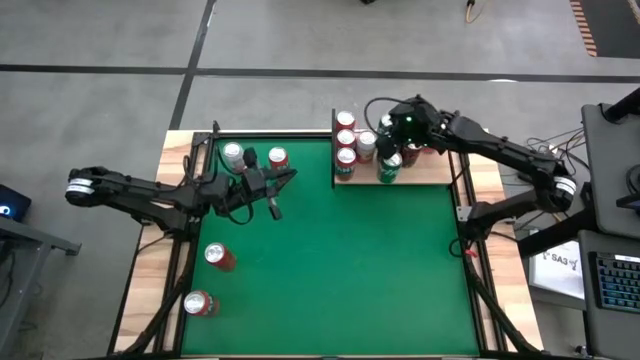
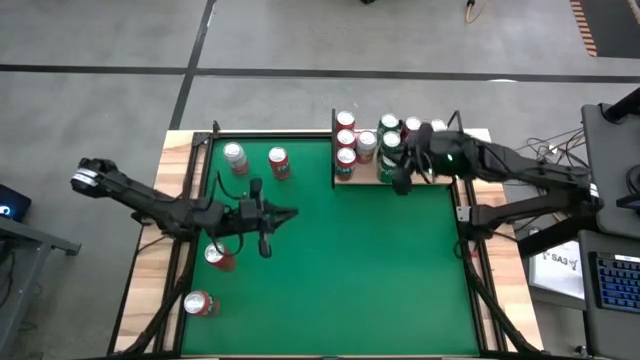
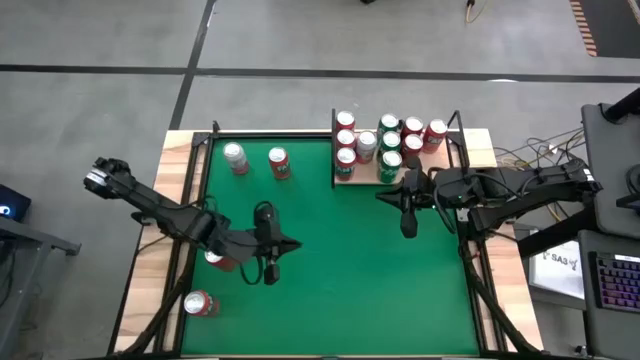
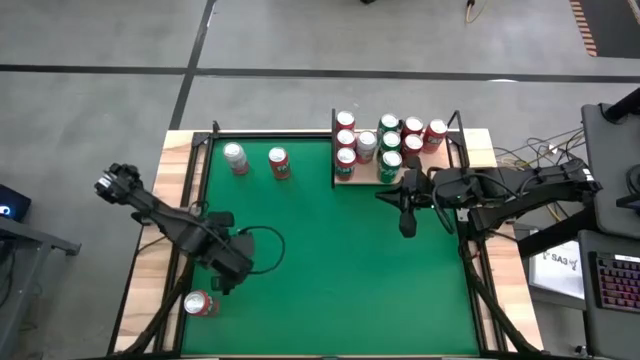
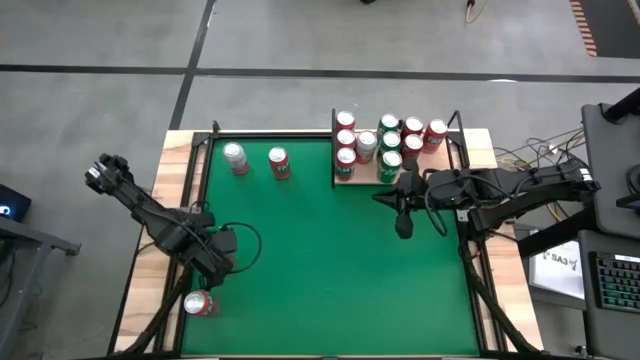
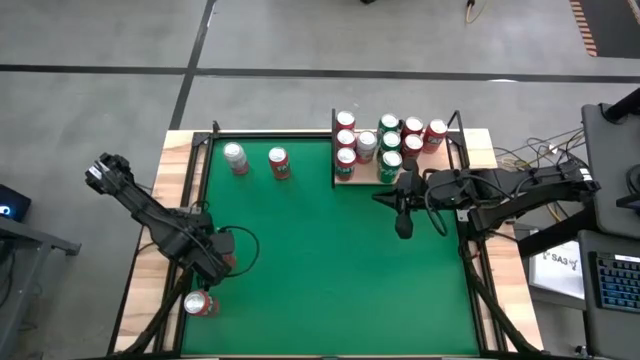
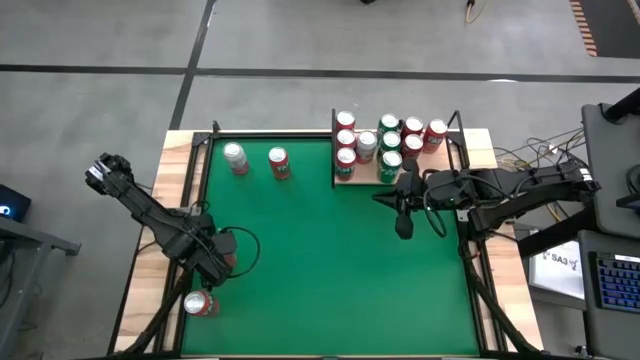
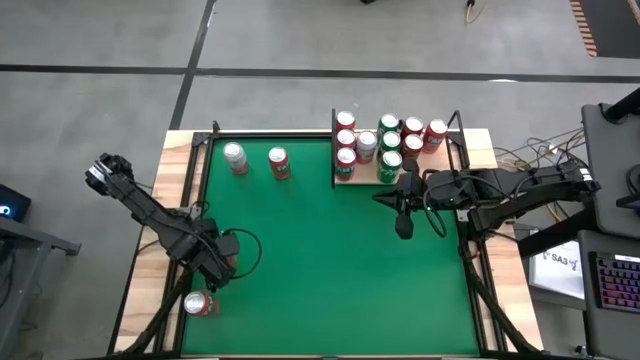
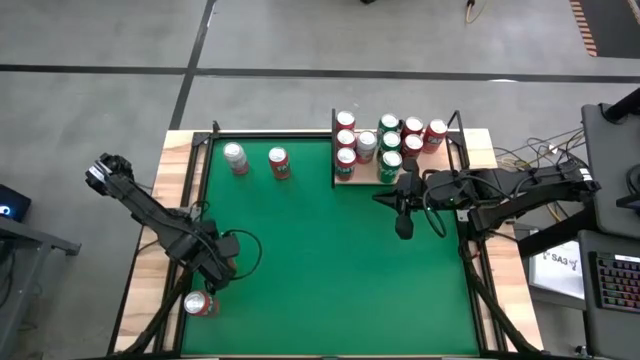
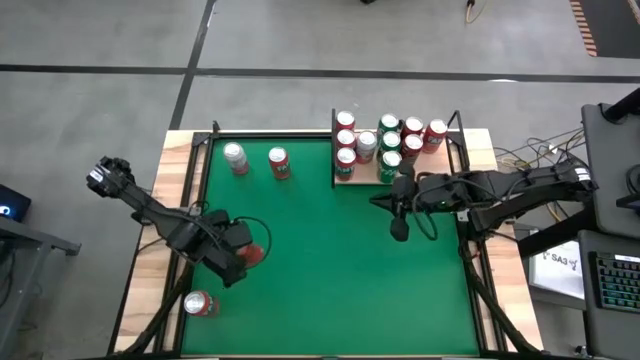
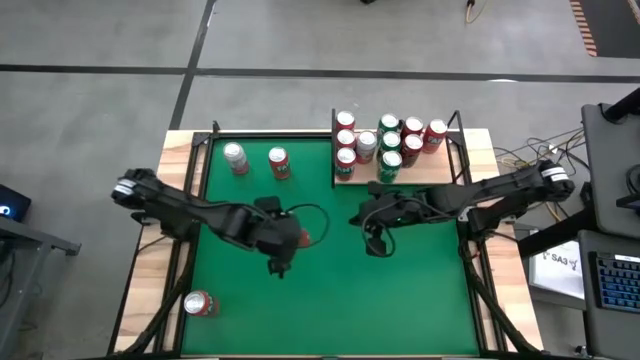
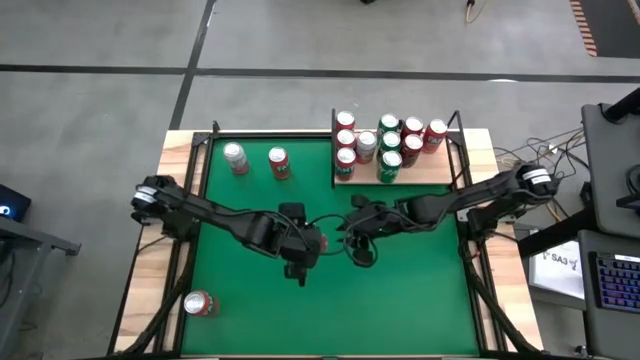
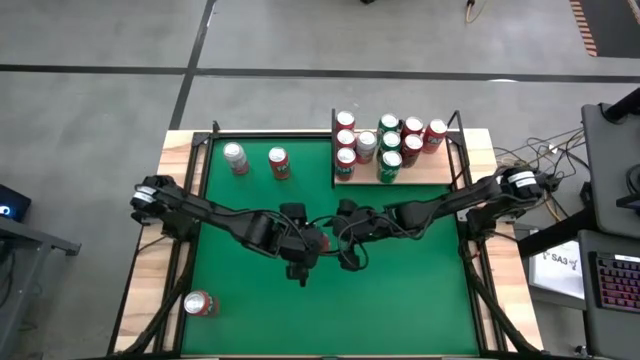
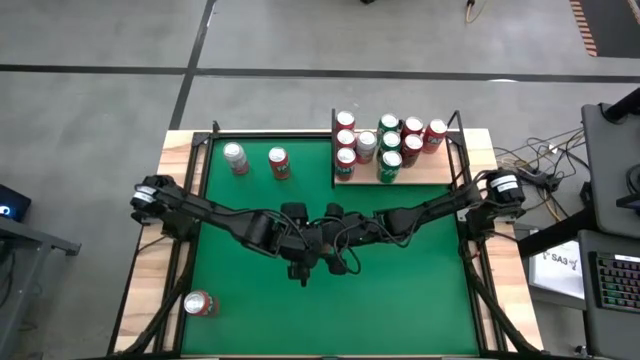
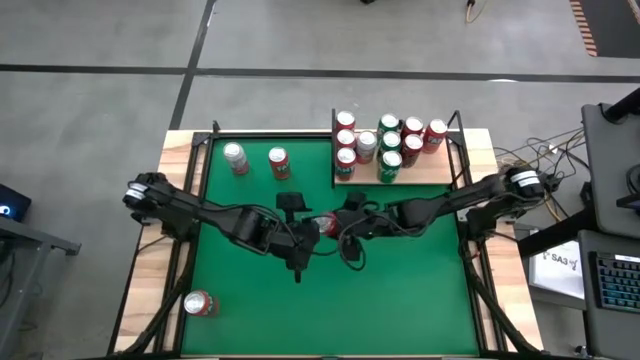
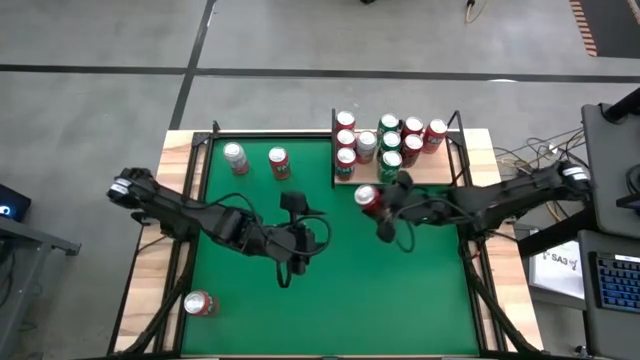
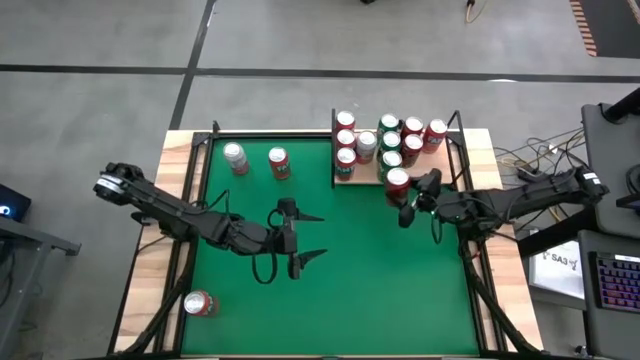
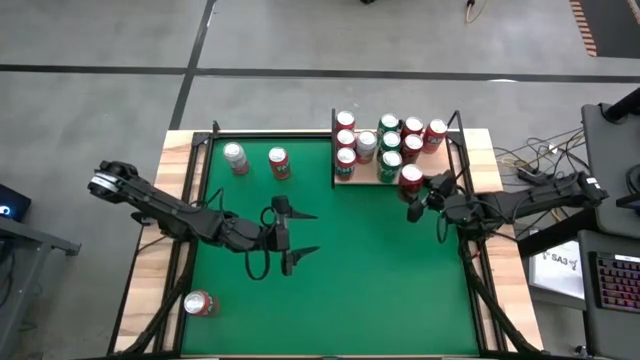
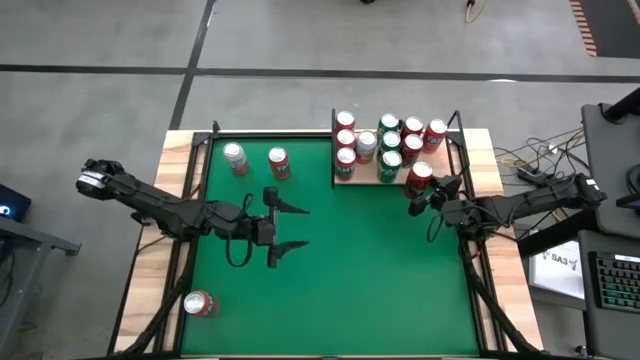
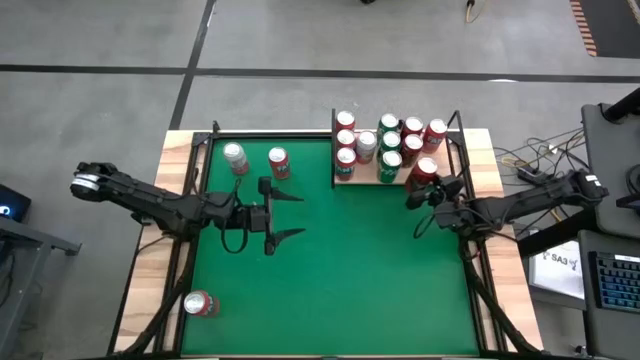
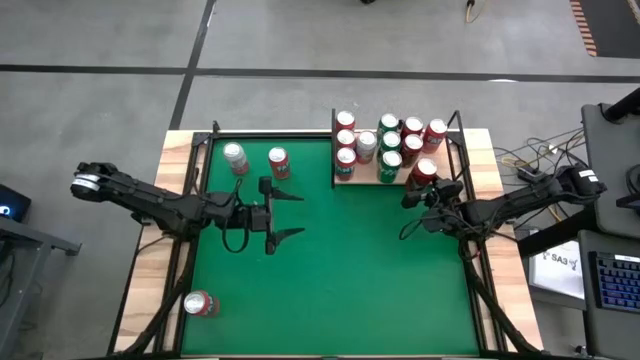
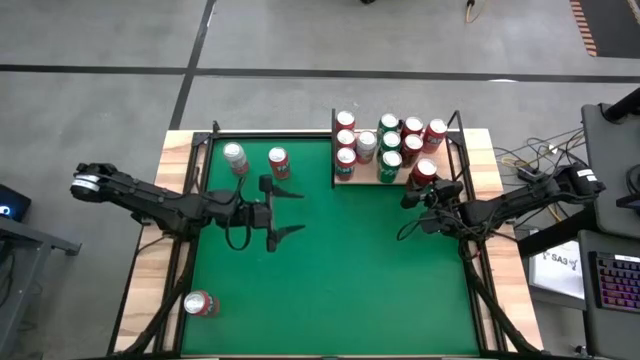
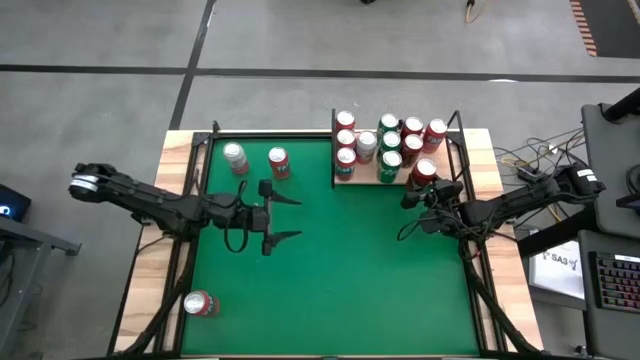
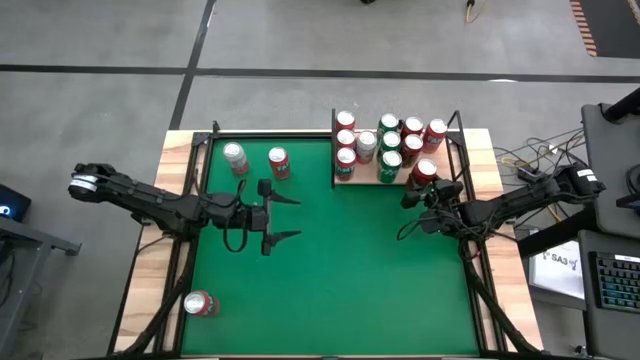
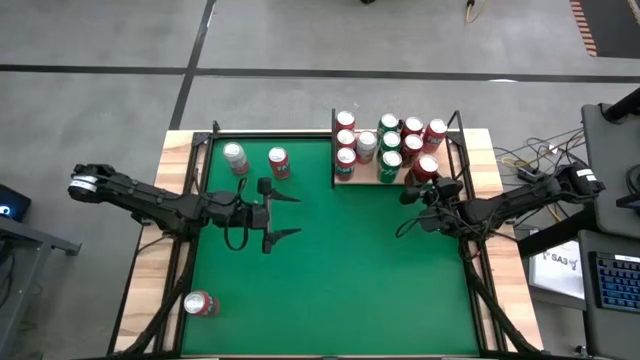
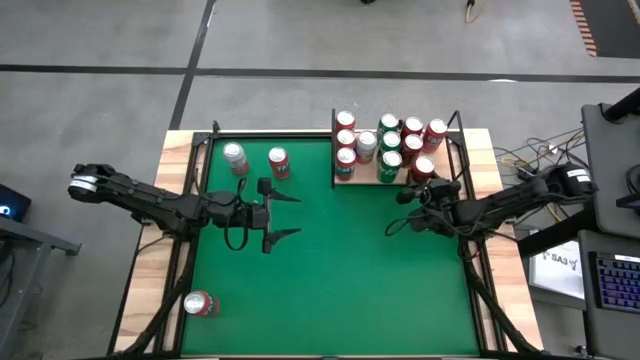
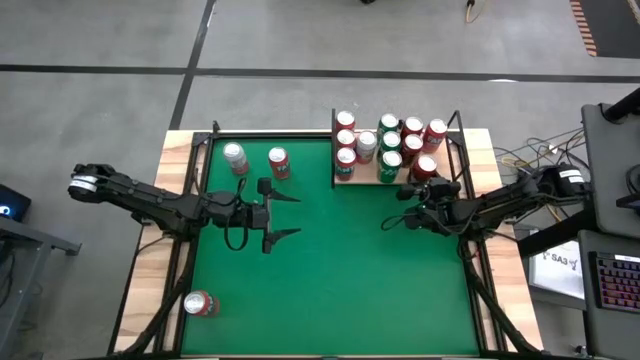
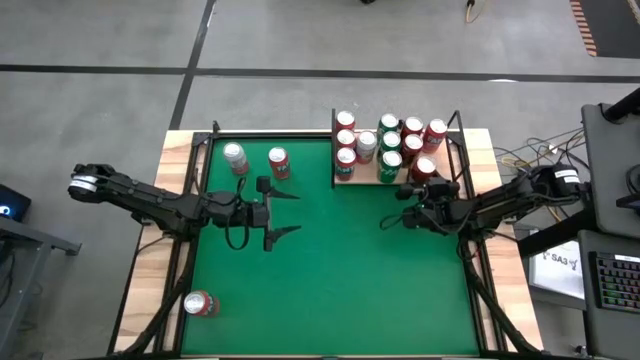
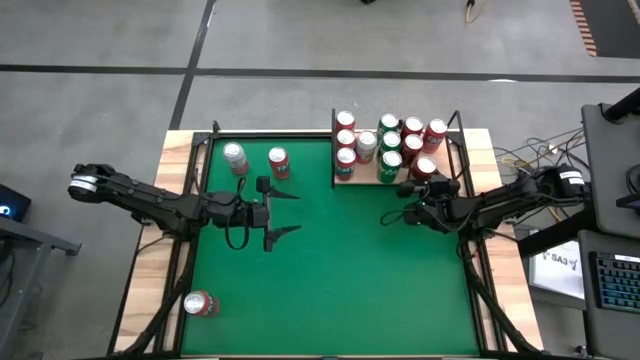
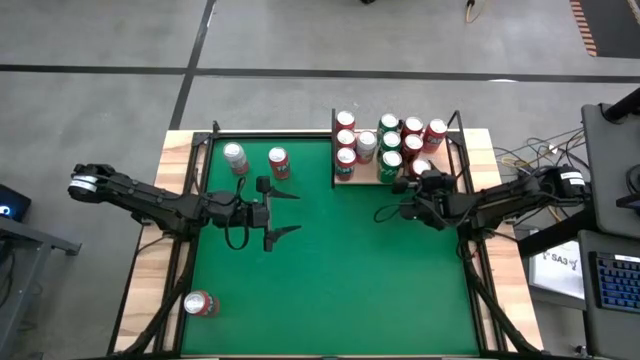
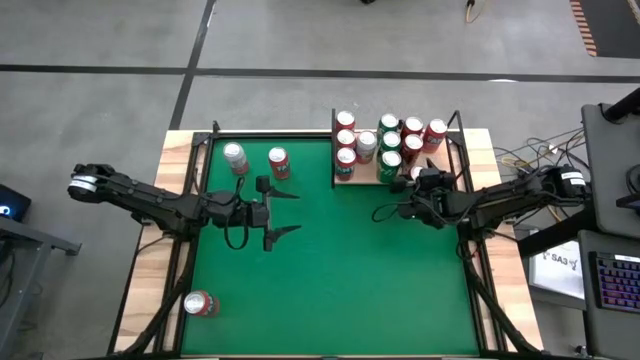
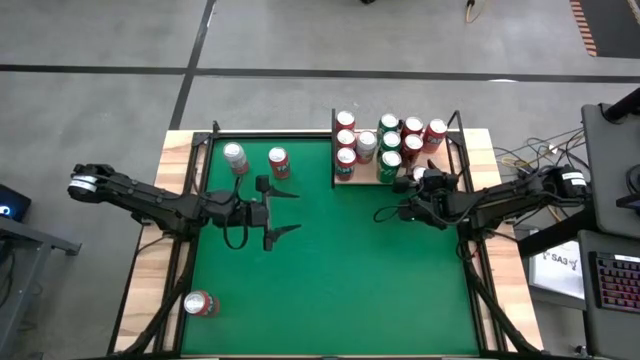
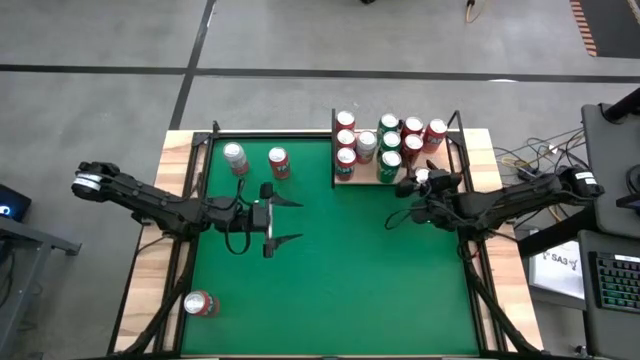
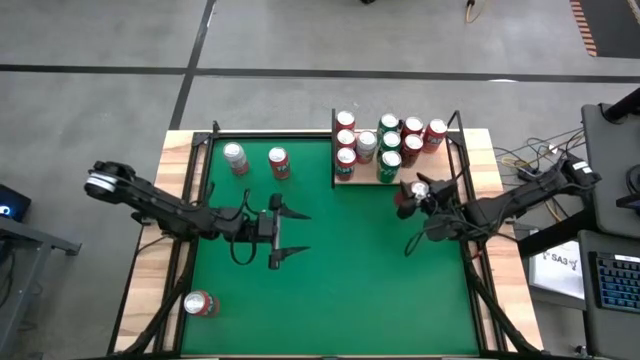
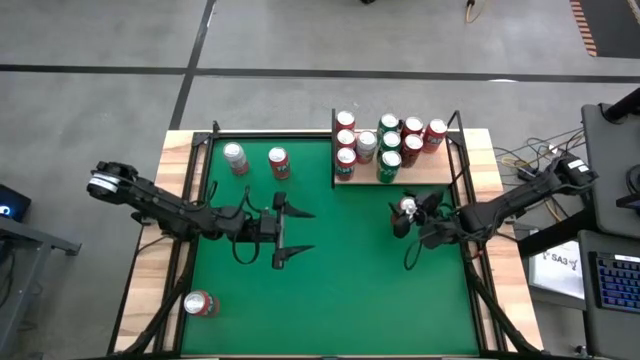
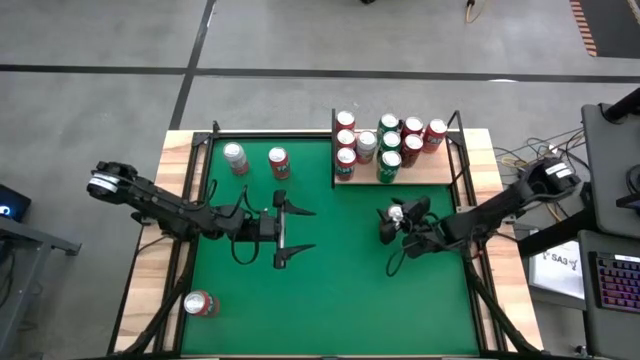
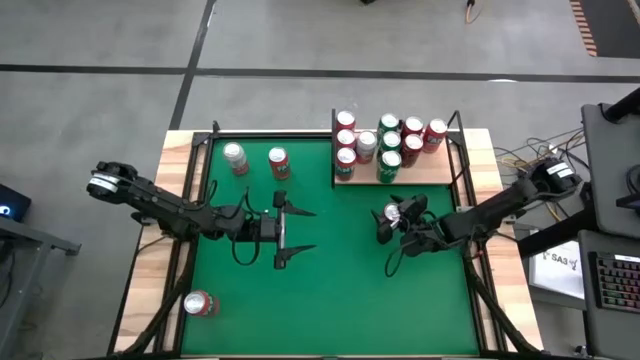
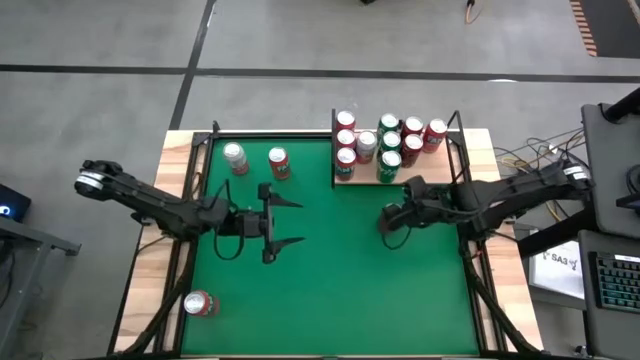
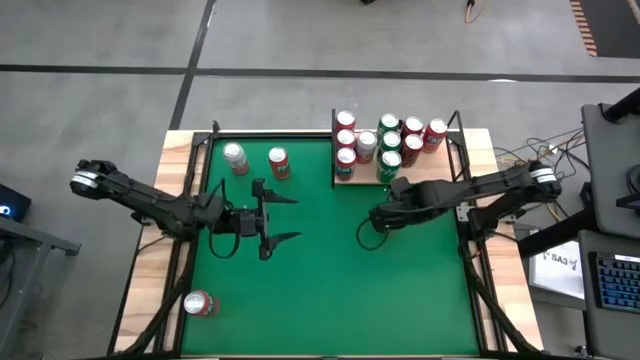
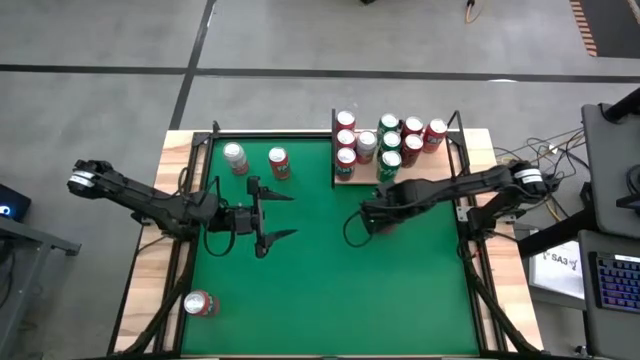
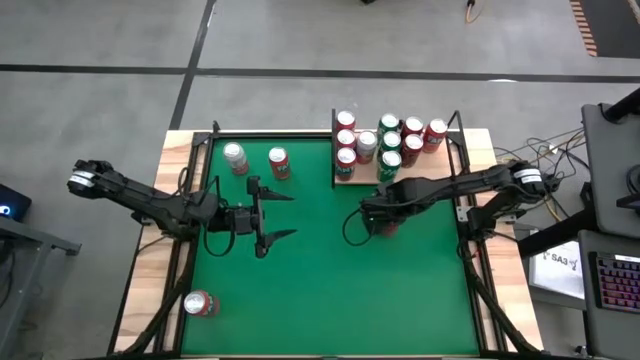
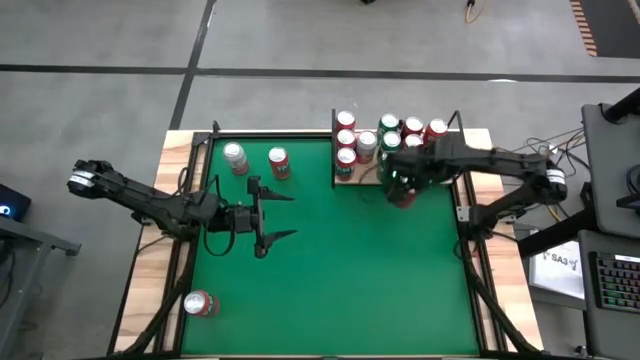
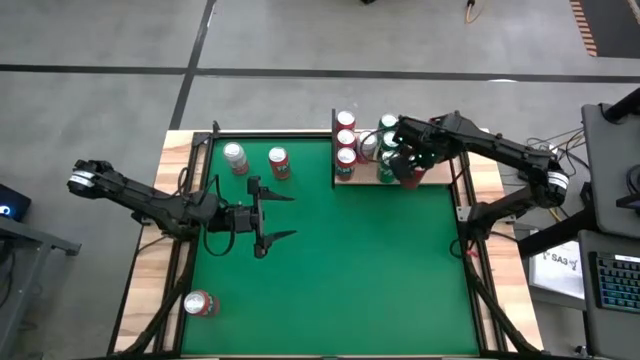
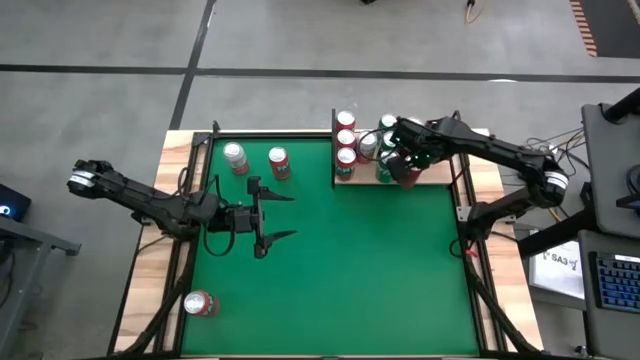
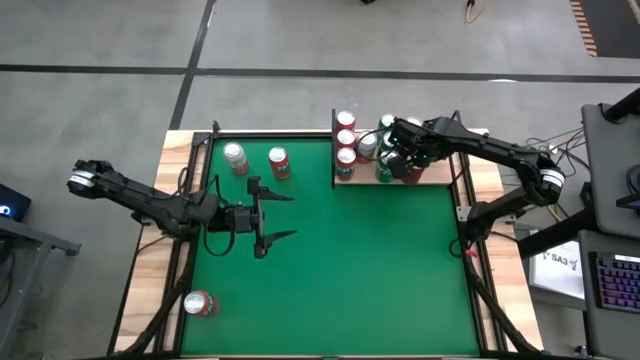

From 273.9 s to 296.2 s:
Task: Place canned beverage on shelf
Put the red/black soda can on the shelf aligned with the other red/black soda cans
